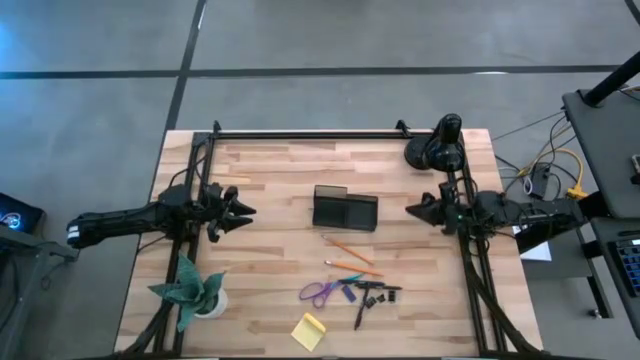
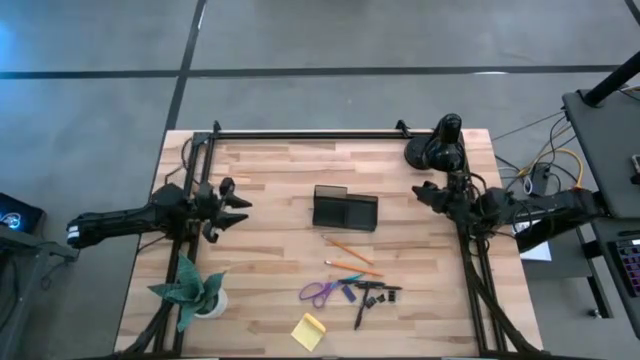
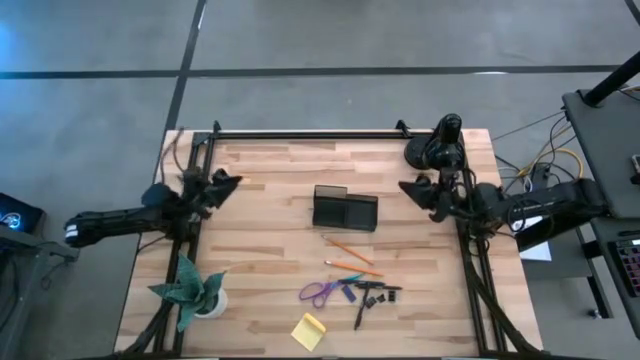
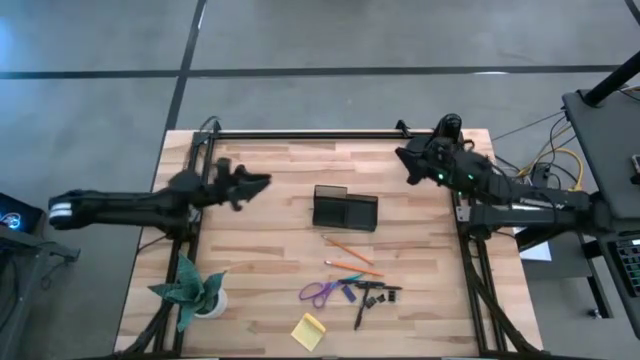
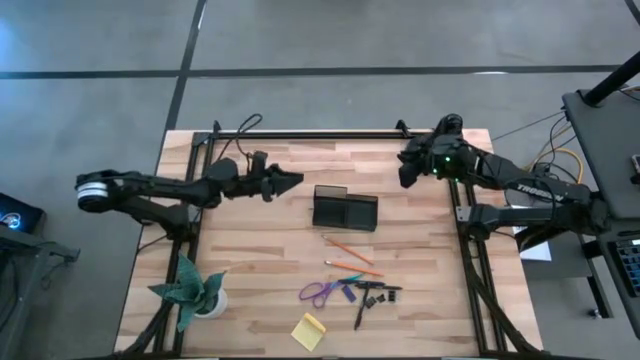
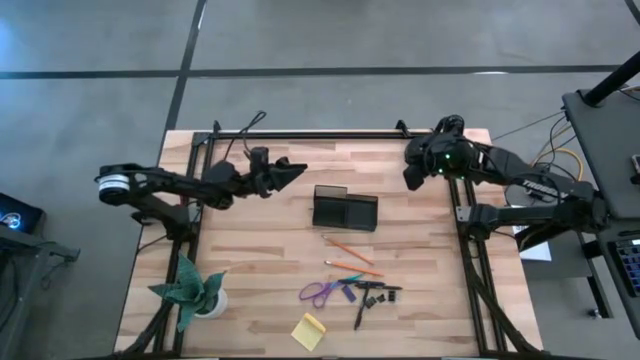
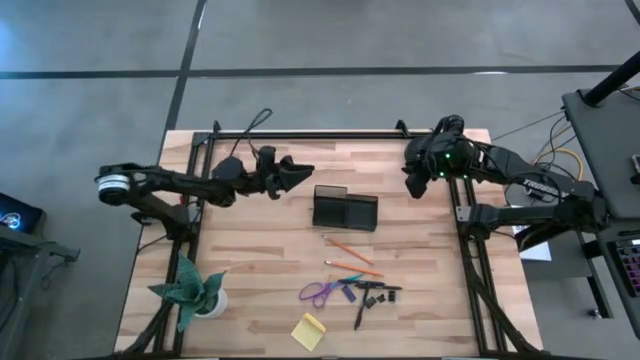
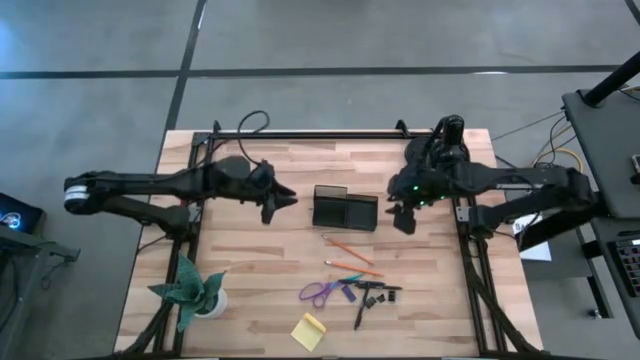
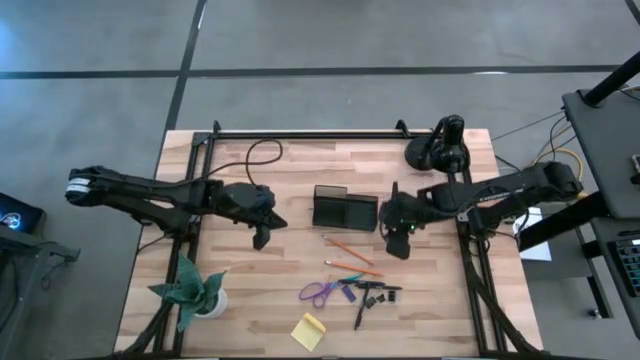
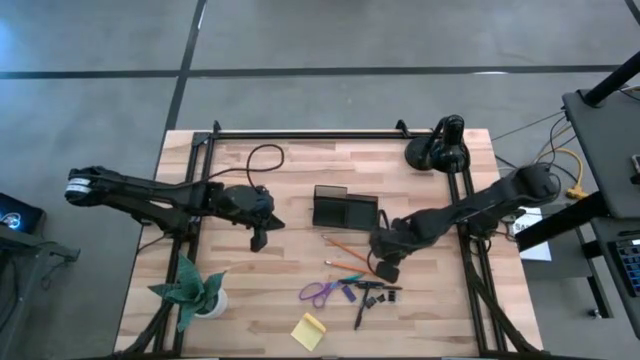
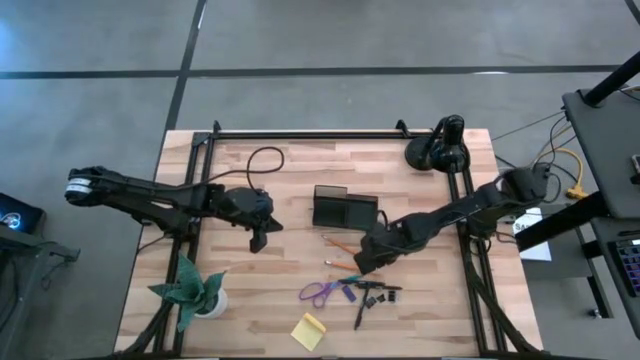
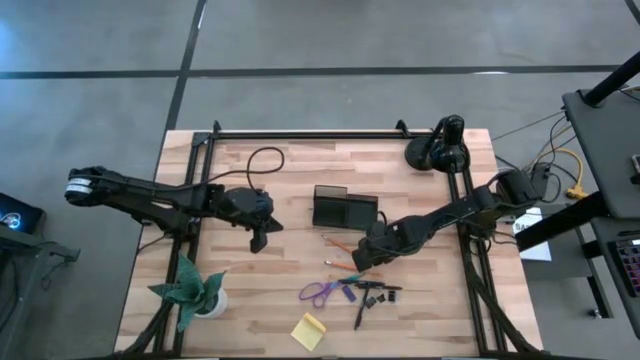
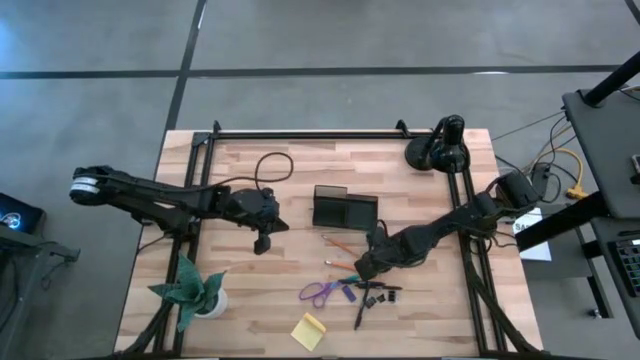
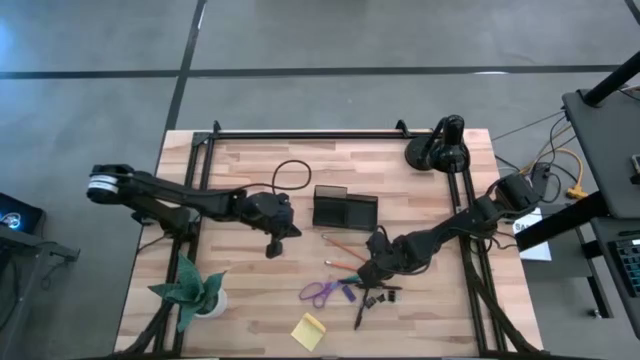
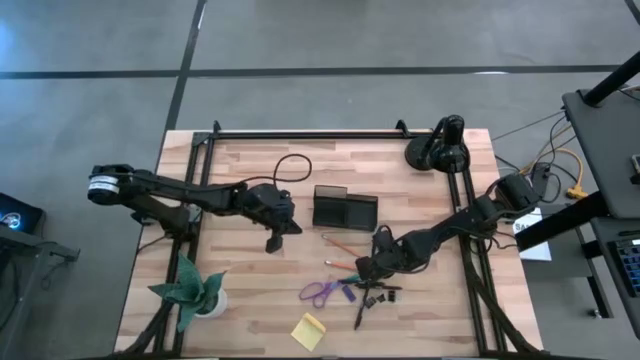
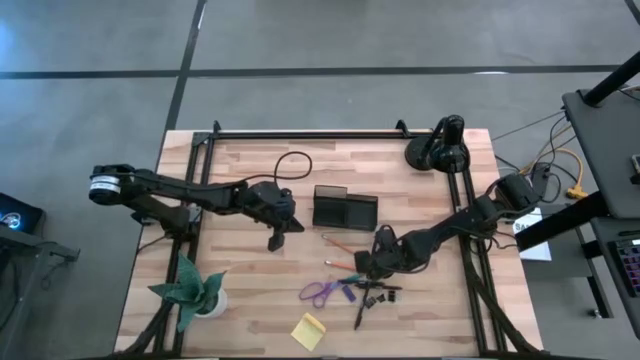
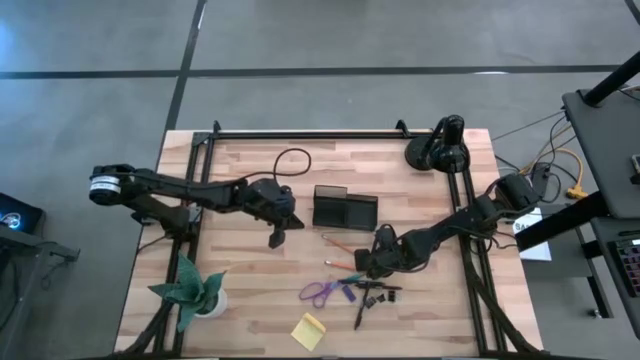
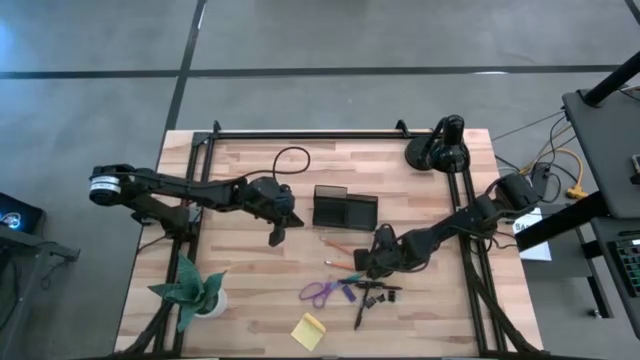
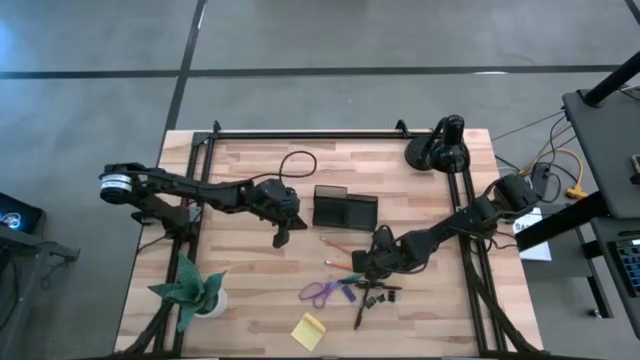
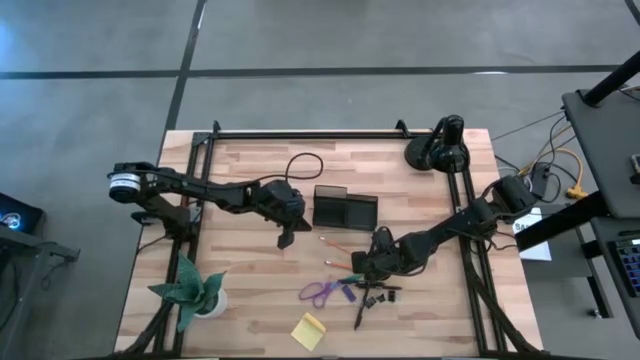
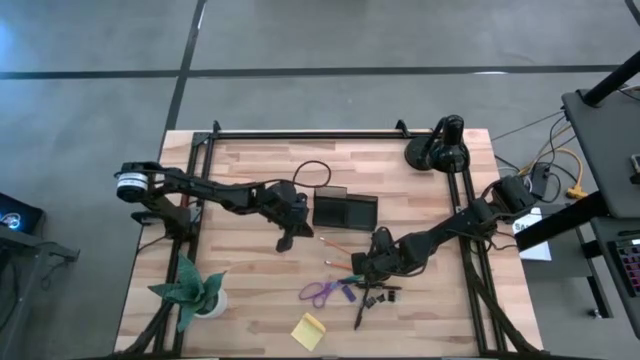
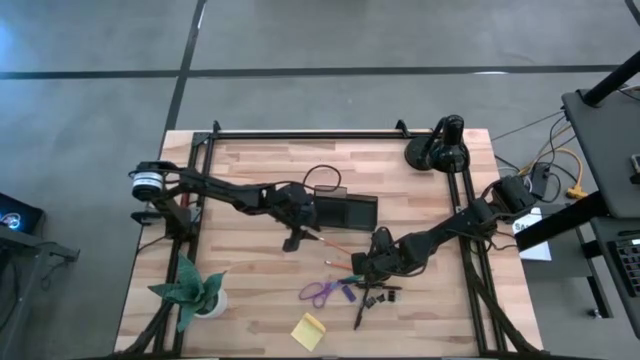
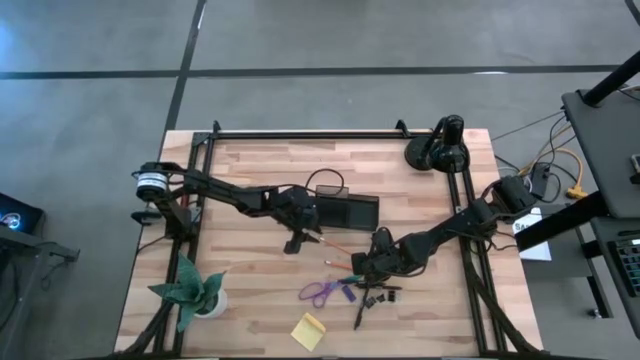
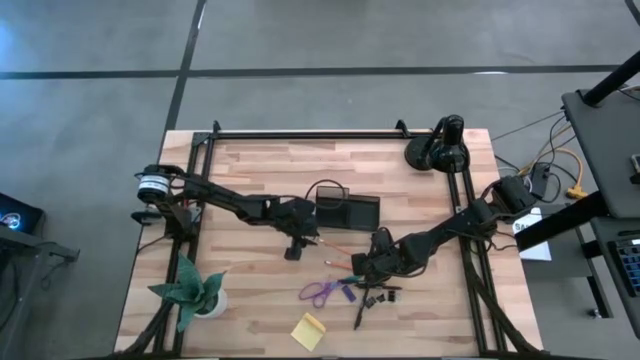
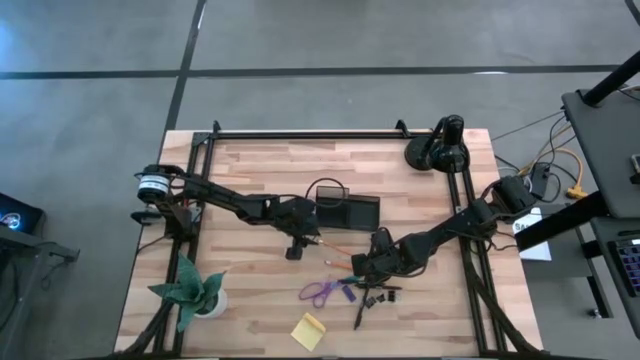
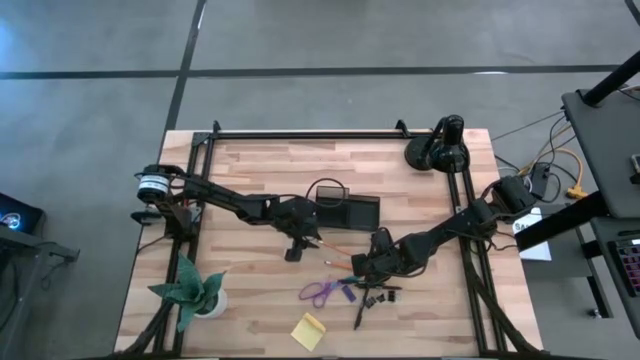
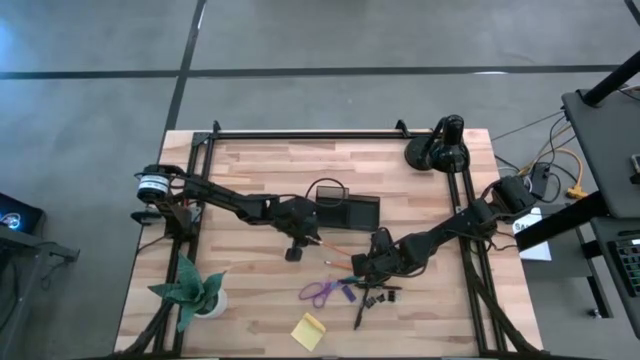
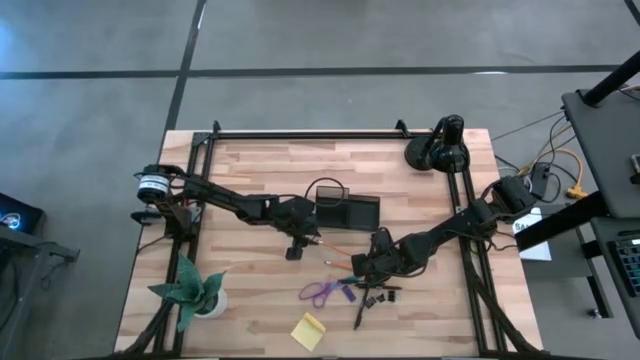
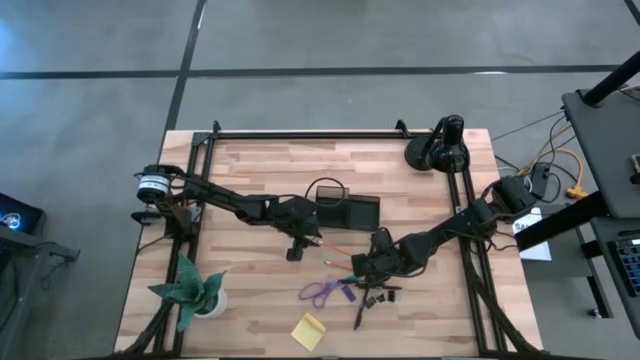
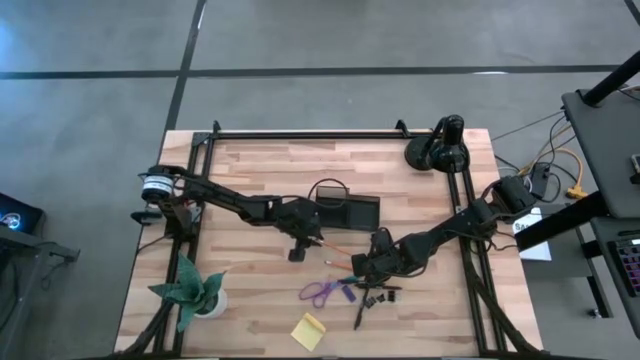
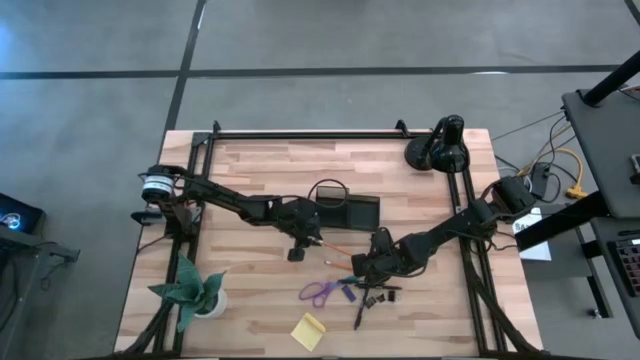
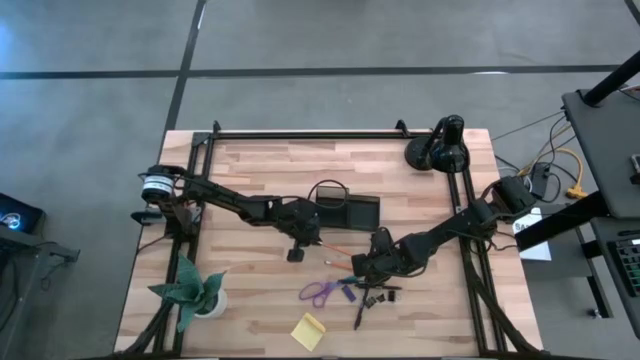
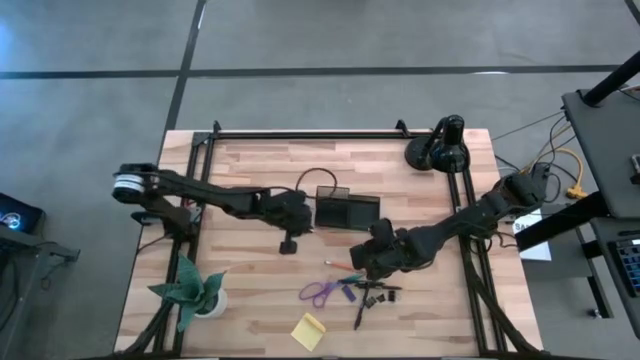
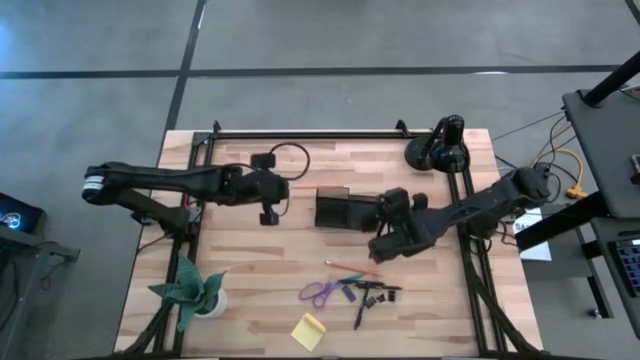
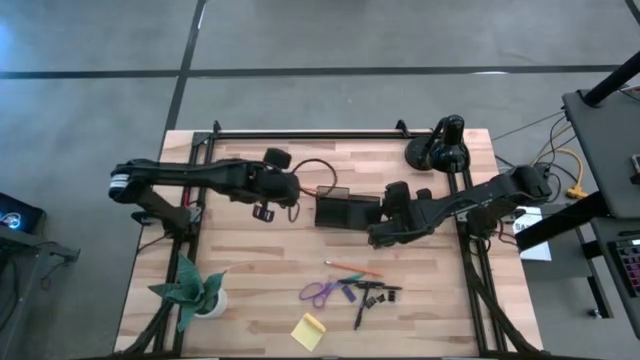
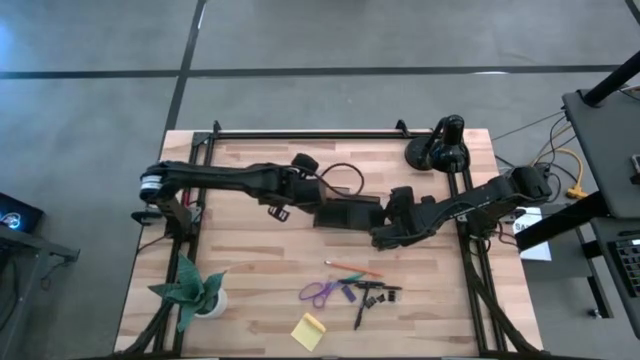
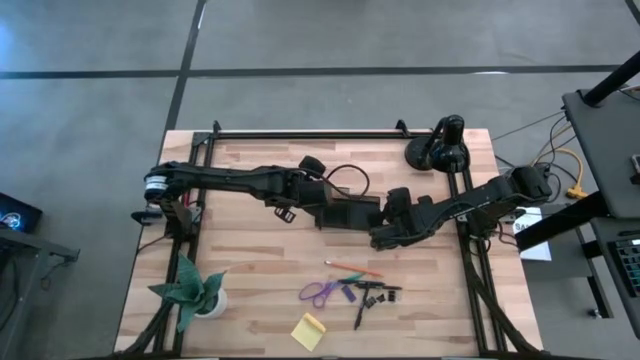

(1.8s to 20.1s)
Task: Pick and place office supplies into organizer
Put the top yellow pencil into the black desk organizer
